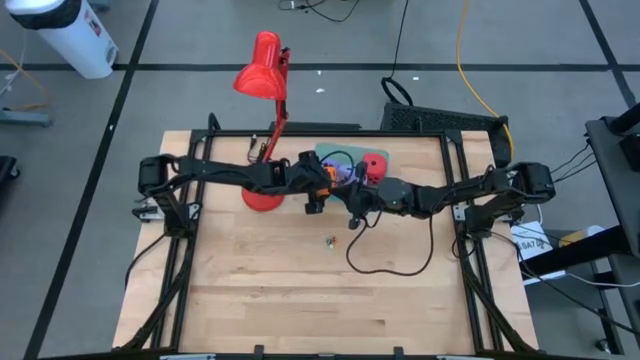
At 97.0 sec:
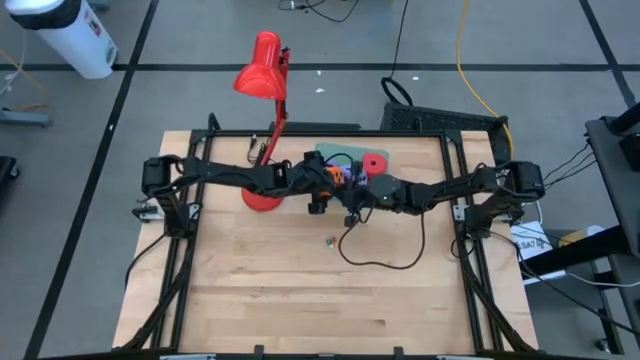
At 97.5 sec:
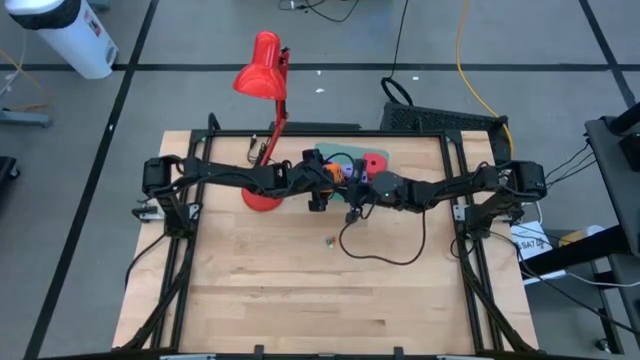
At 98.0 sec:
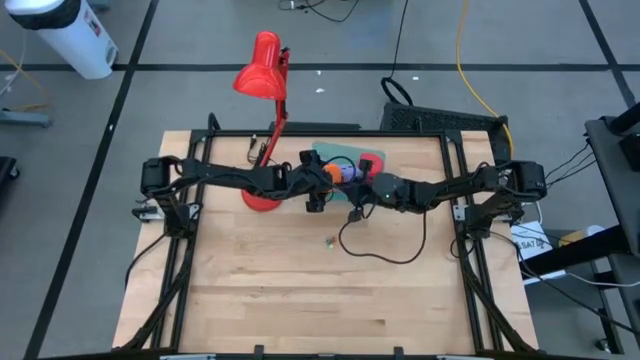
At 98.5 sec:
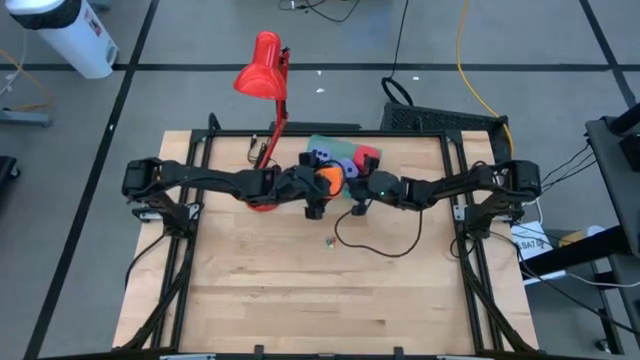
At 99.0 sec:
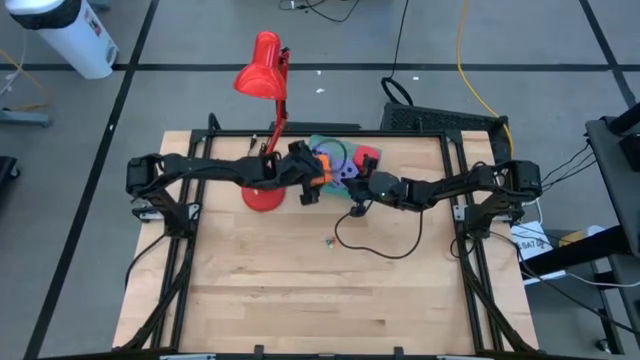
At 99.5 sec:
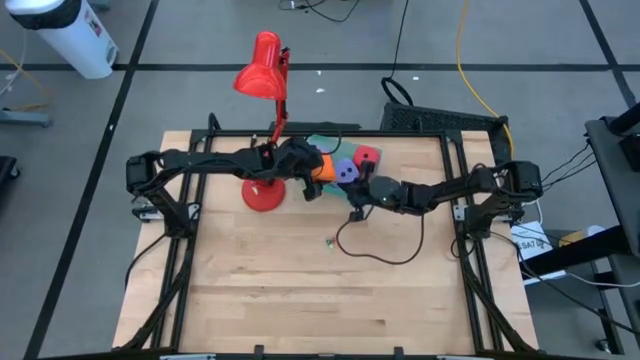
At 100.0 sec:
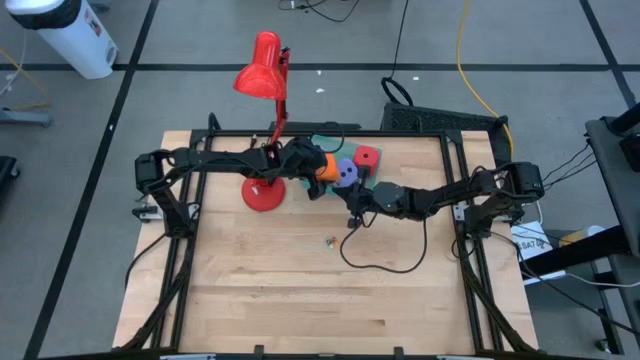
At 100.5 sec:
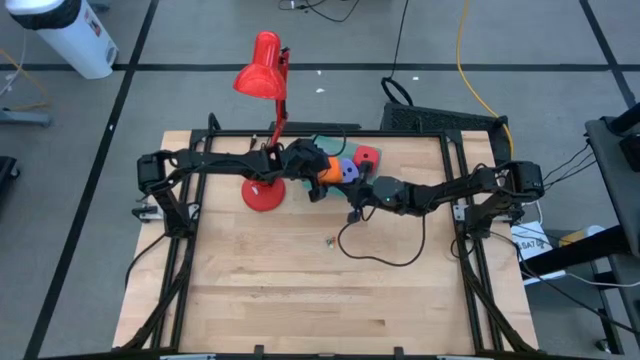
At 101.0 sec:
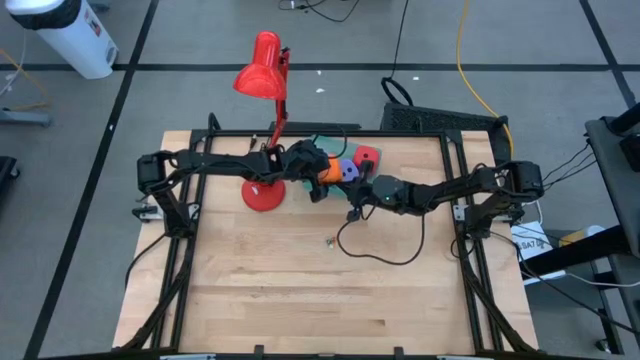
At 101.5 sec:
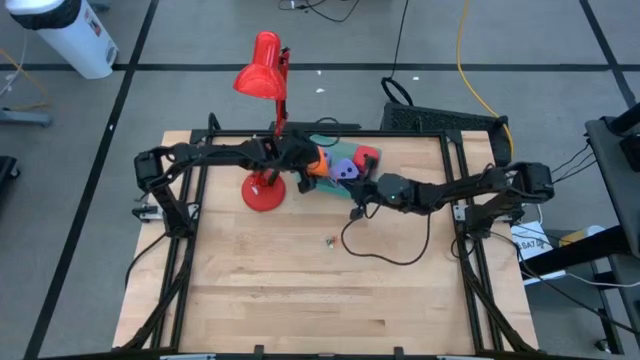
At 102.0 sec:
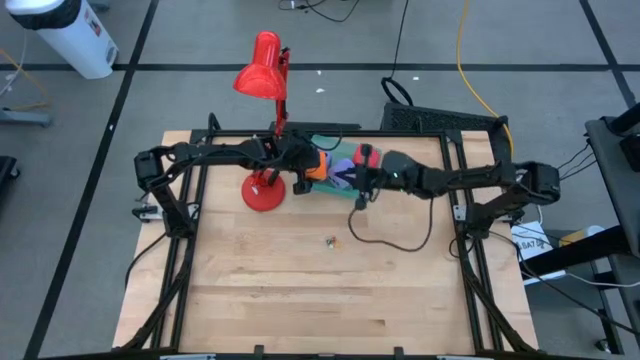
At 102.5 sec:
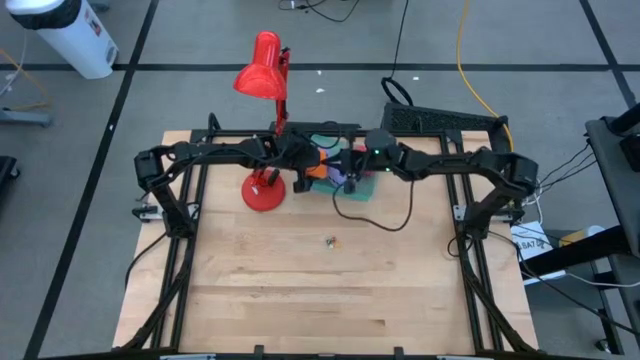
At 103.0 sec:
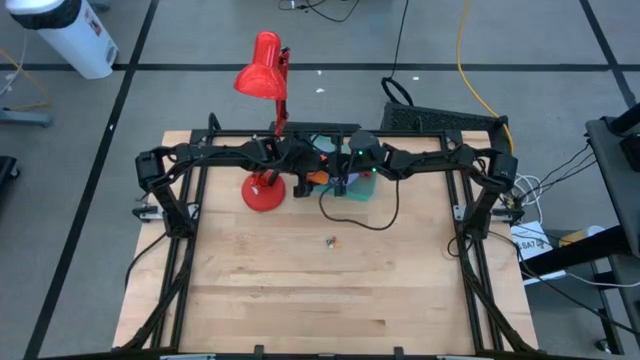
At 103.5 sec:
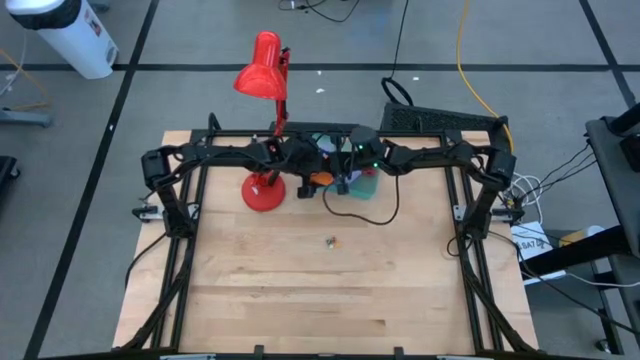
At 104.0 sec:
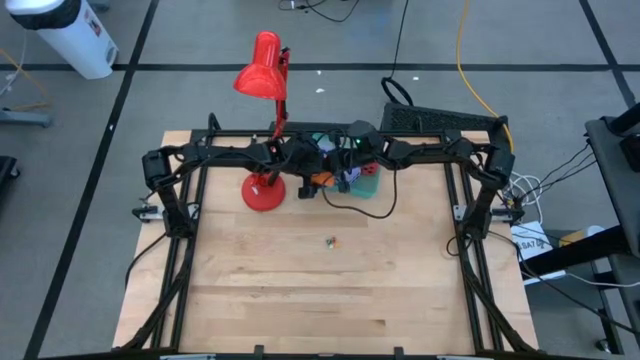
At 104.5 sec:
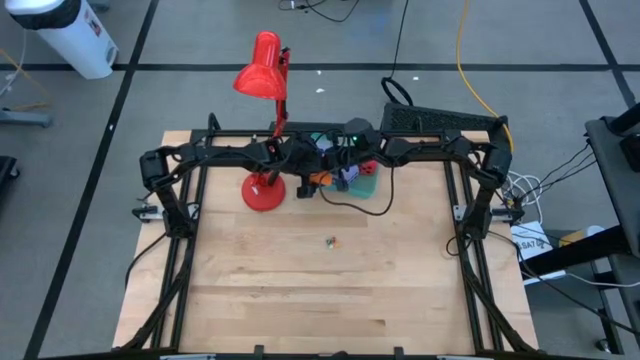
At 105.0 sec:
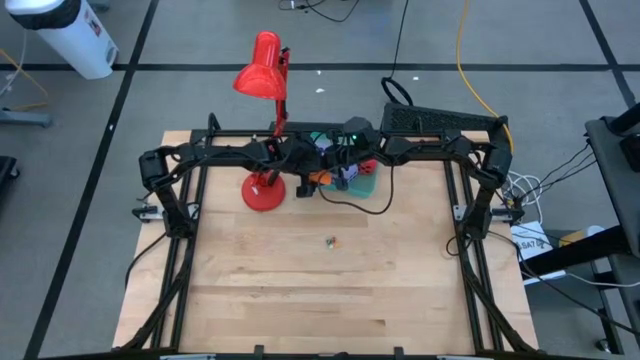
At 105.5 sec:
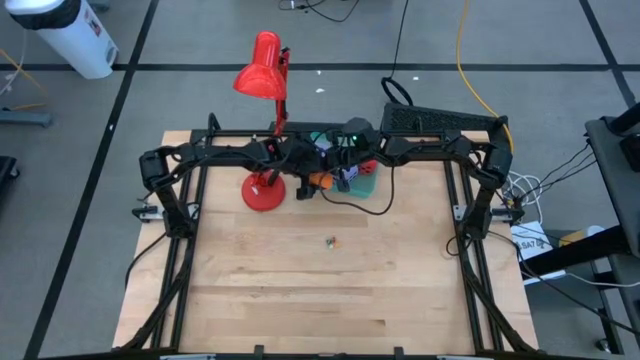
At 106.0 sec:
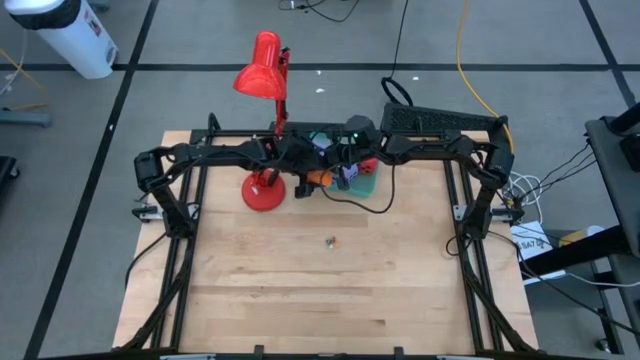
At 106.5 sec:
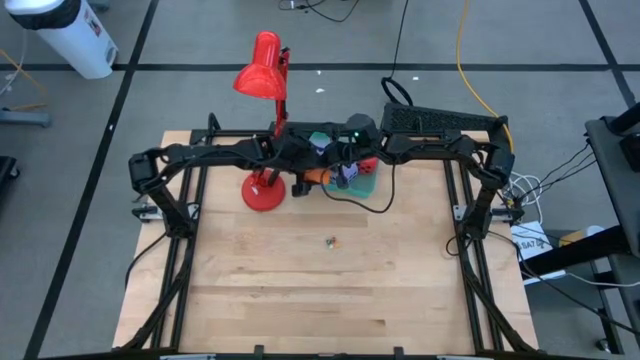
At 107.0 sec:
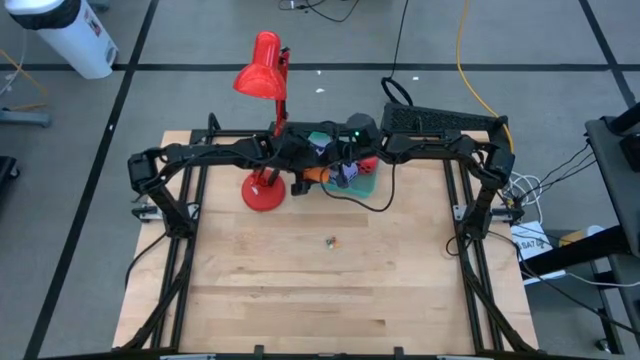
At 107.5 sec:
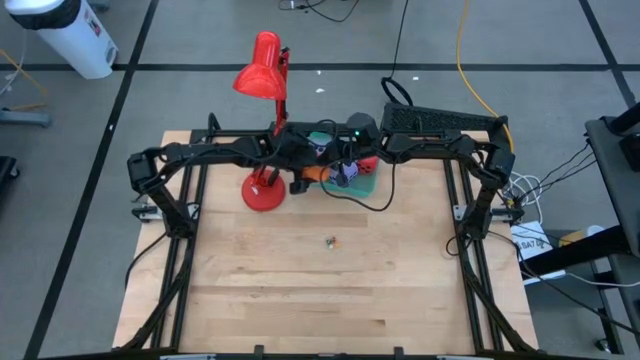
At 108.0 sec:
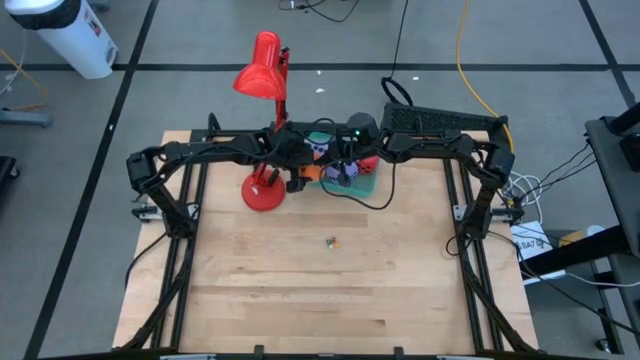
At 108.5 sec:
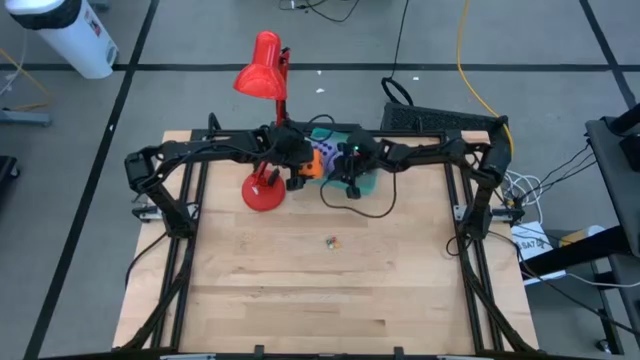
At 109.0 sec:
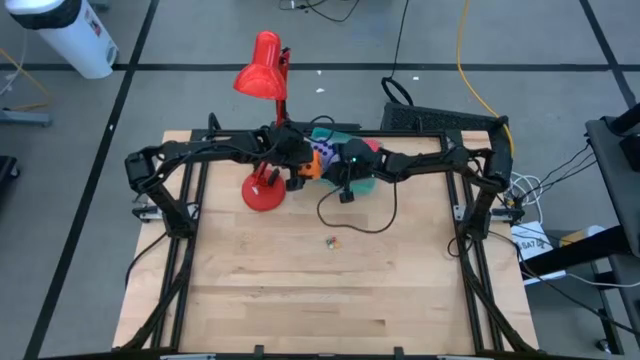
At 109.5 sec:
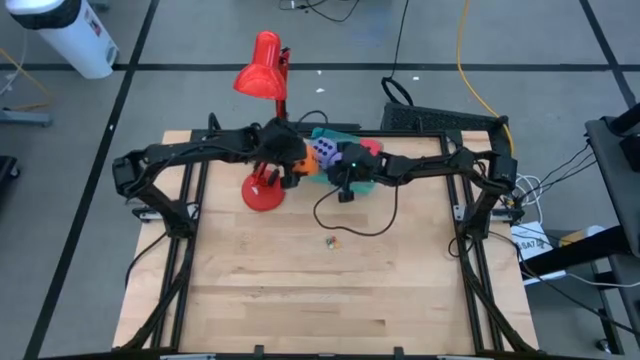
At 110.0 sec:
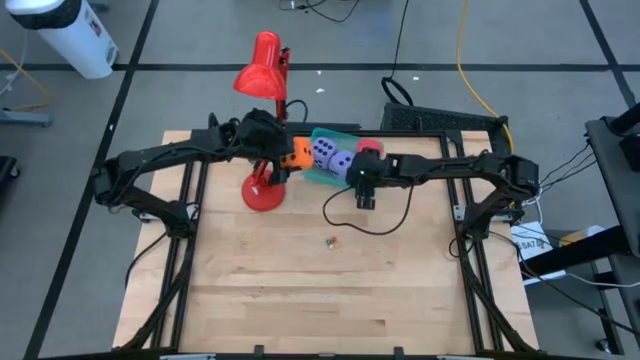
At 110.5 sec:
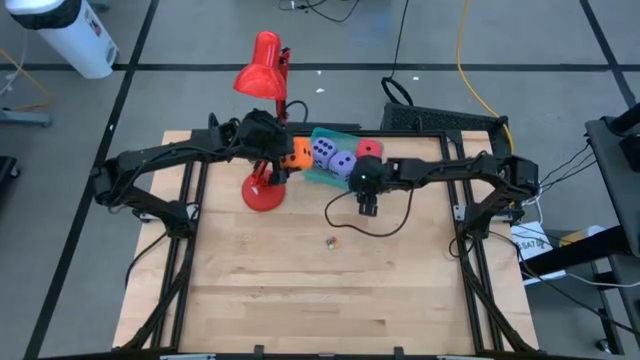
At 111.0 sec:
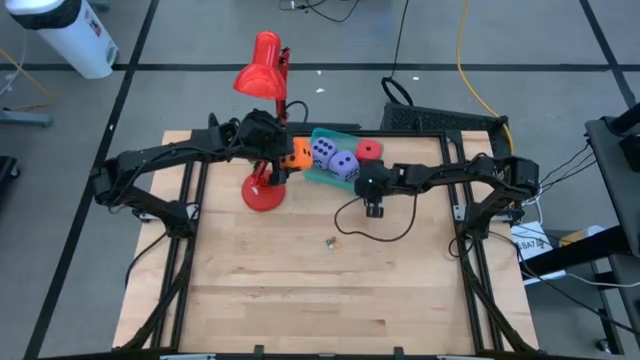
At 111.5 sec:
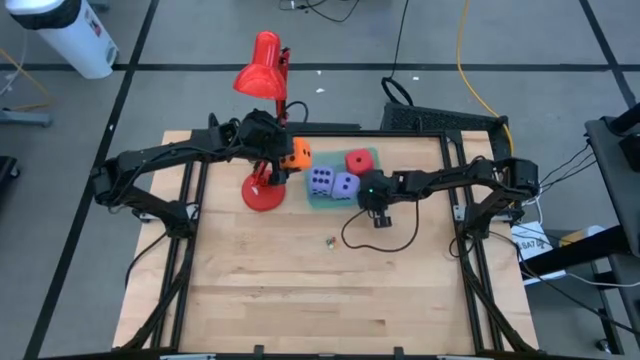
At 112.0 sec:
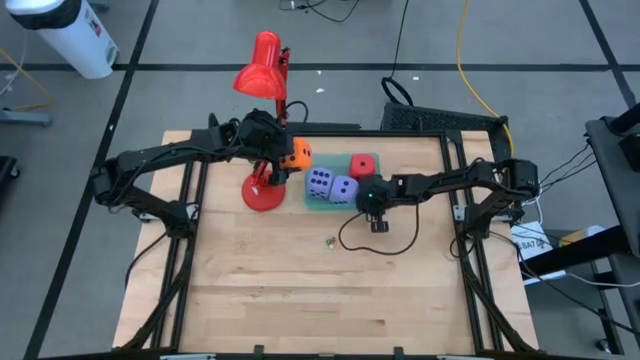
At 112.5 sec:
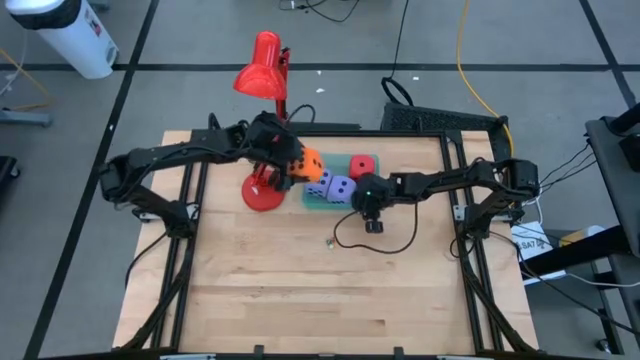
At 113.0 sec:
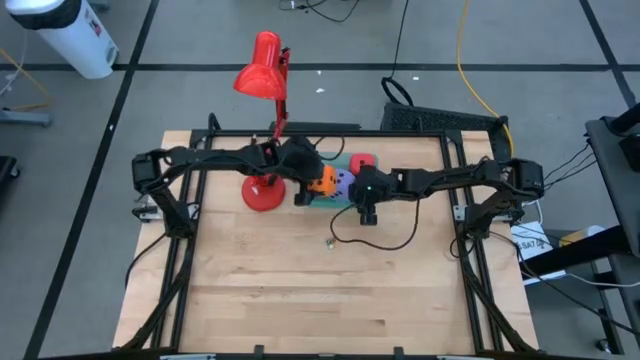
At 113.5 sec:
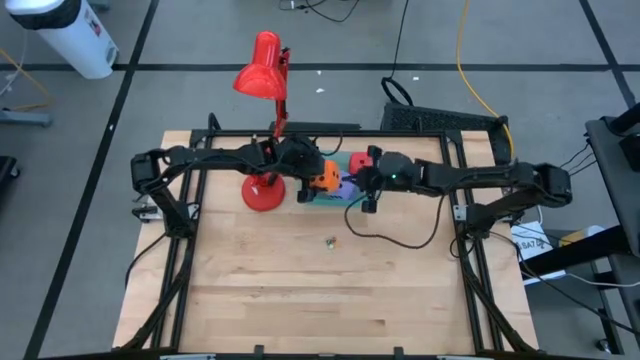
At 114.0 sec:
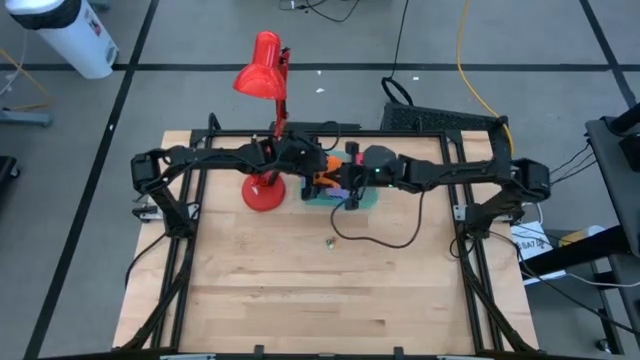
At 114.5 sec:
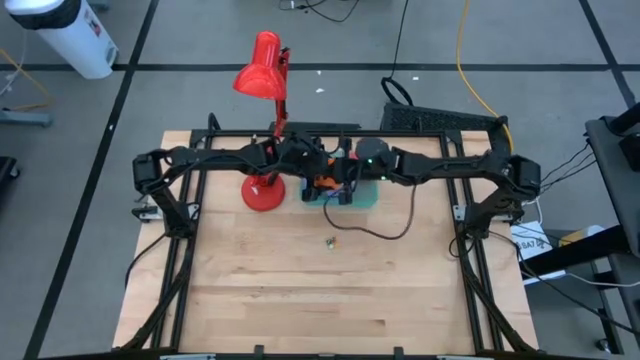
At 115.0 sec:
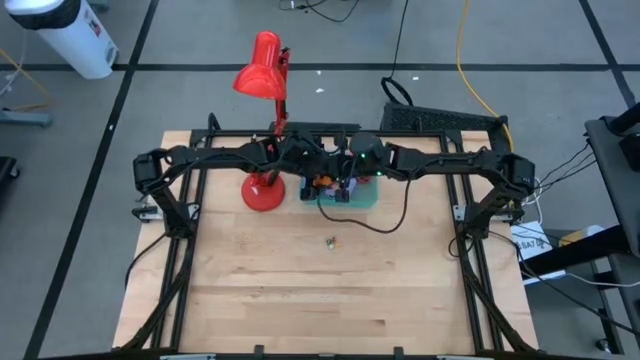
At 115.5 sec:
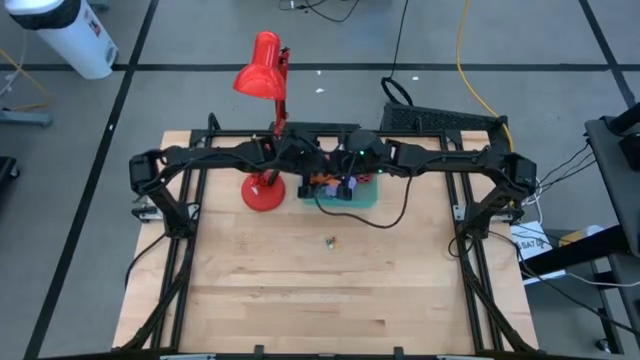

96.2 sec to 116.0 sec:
Task: Pick & Place Dice
Put the large orange die into the blue bin

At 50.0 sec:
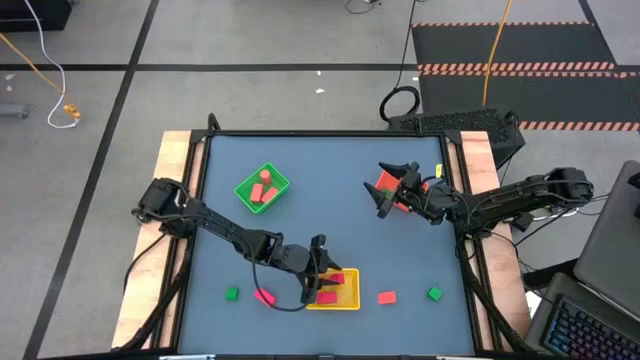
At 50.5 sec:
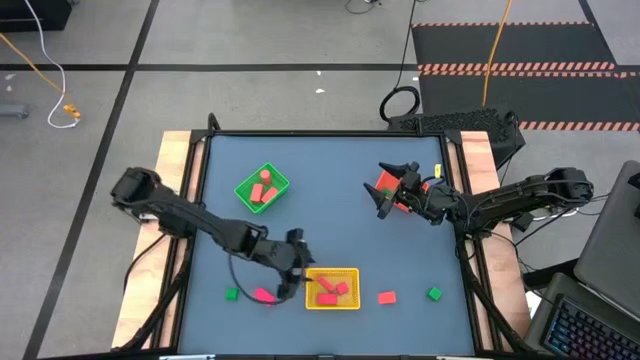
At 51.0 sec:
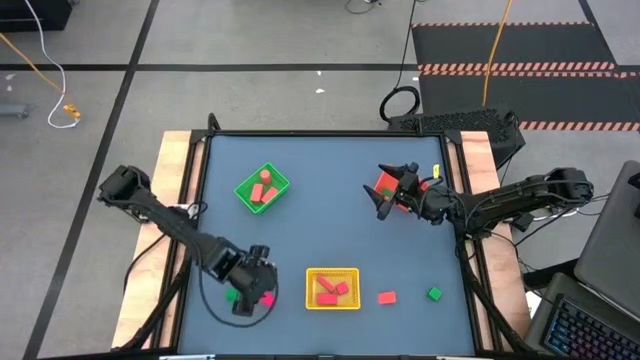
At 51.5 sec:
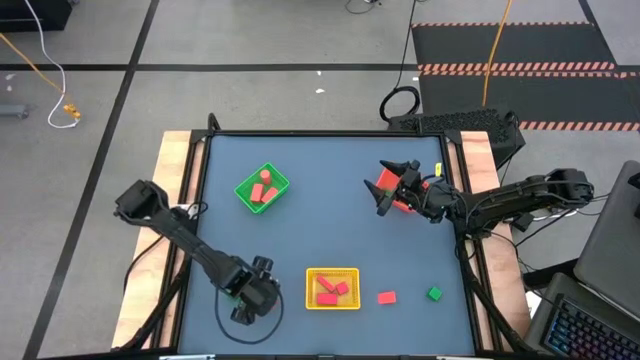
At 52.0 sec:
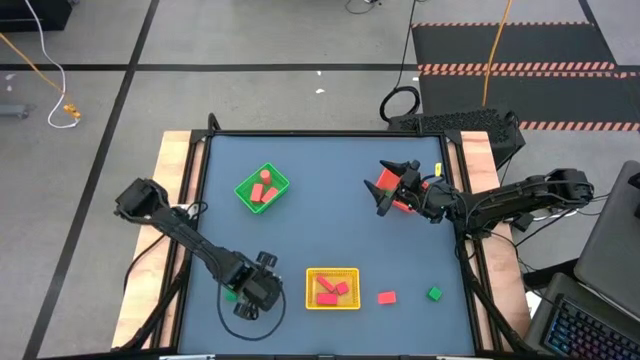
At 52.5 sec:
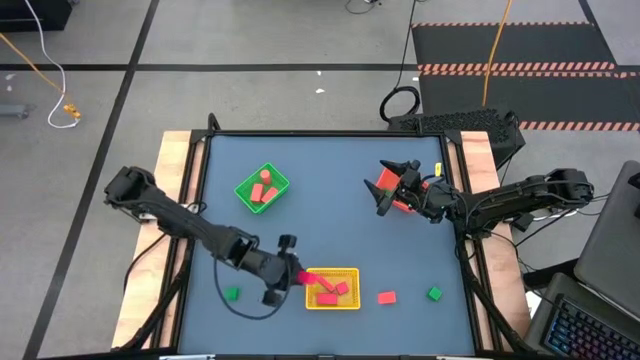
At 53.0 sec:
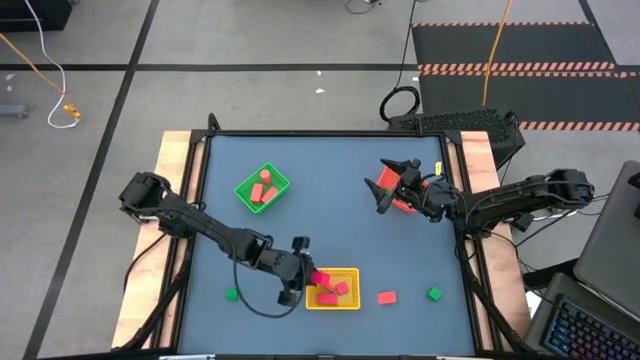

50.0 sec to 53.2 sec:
Task: Sort & place blocks by color
Put the red block into the green bin
